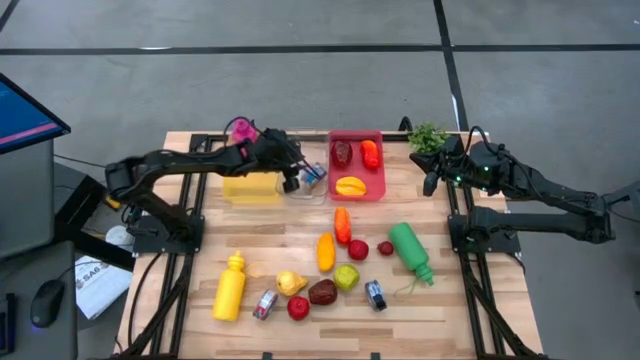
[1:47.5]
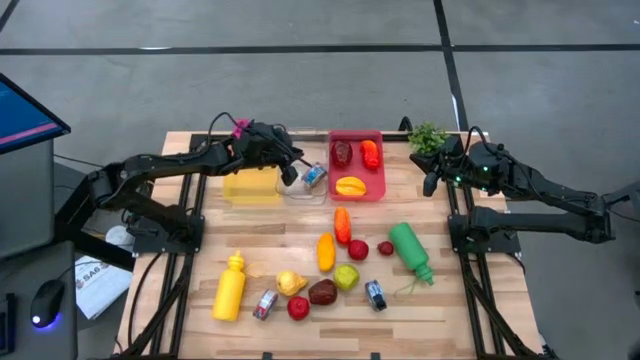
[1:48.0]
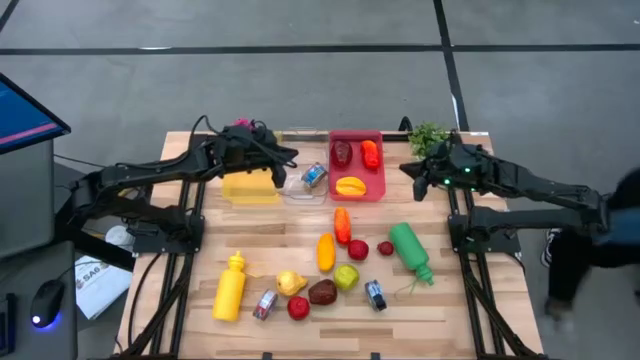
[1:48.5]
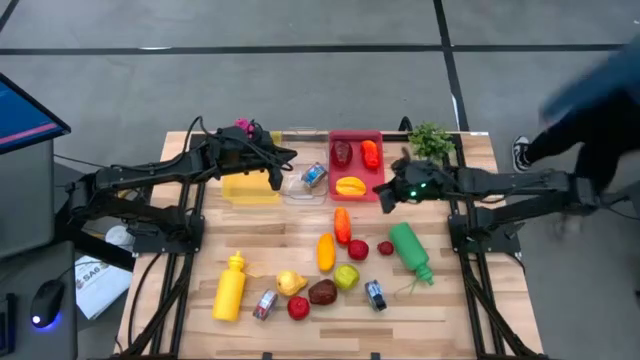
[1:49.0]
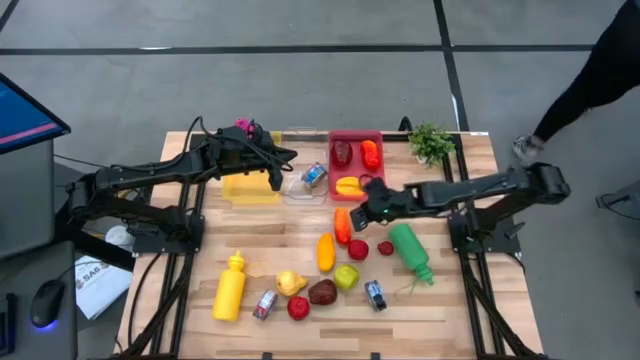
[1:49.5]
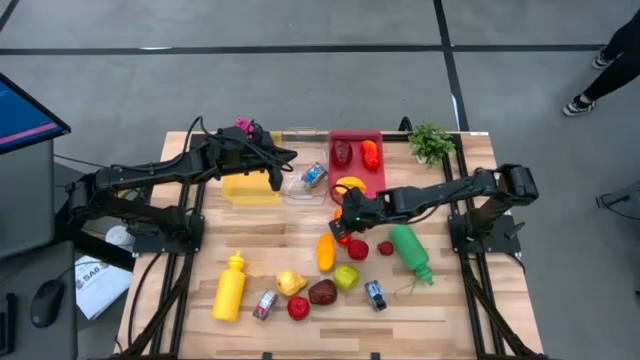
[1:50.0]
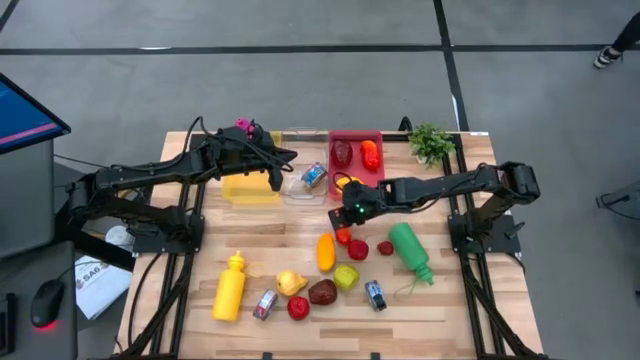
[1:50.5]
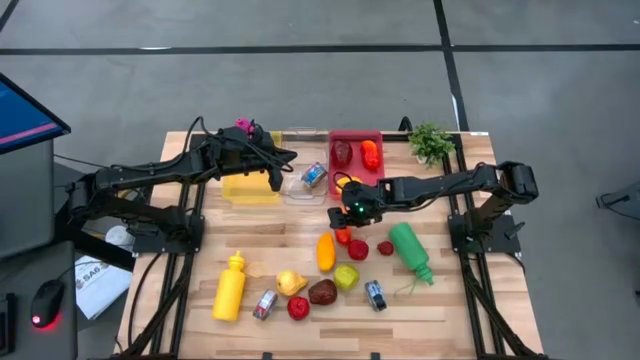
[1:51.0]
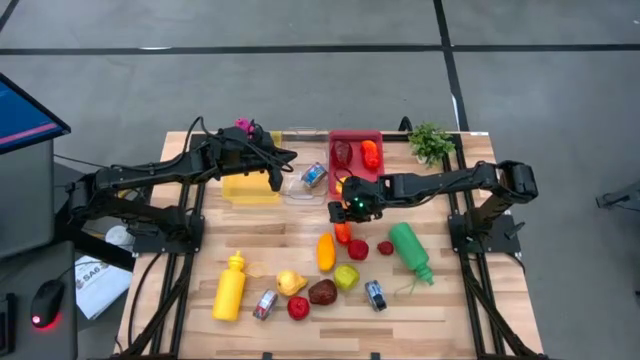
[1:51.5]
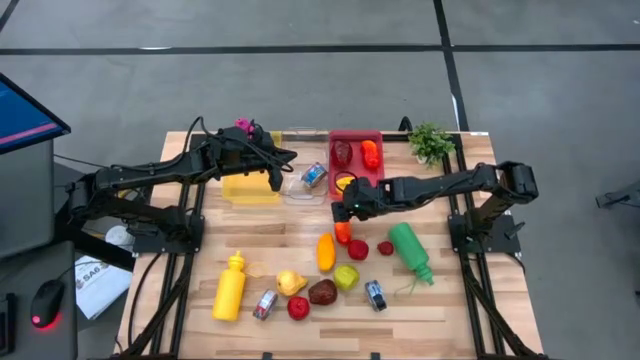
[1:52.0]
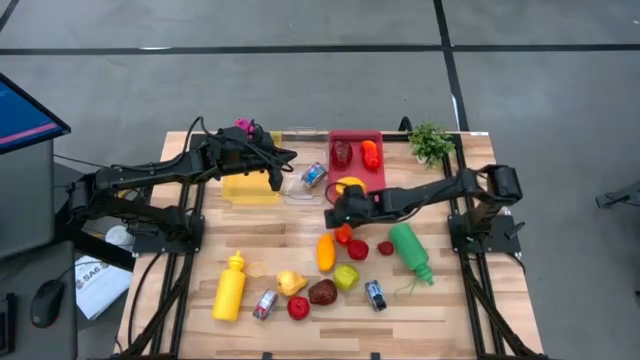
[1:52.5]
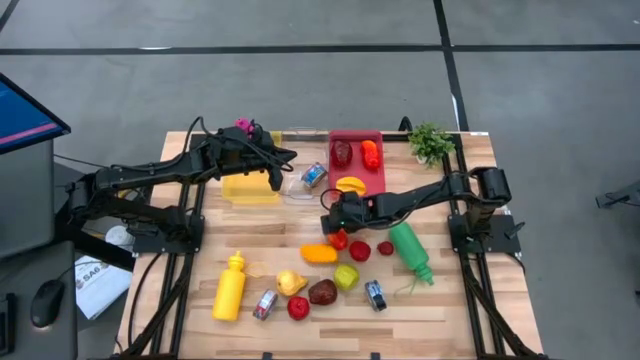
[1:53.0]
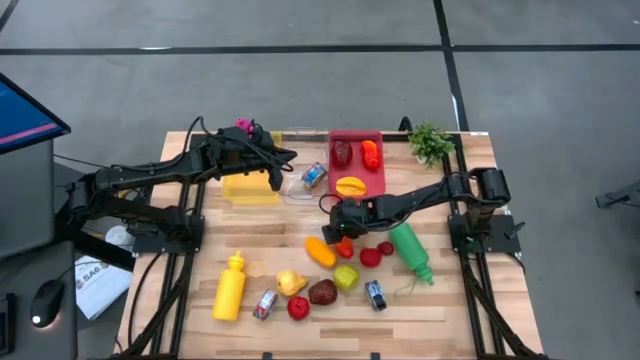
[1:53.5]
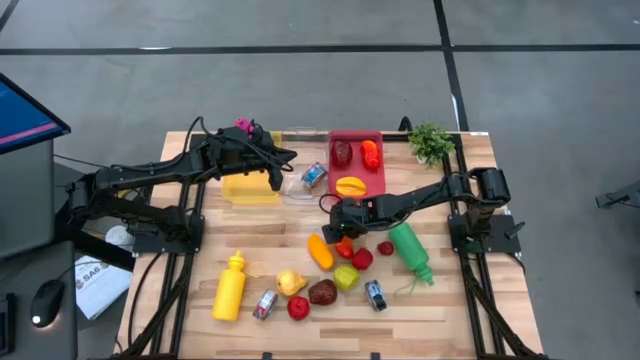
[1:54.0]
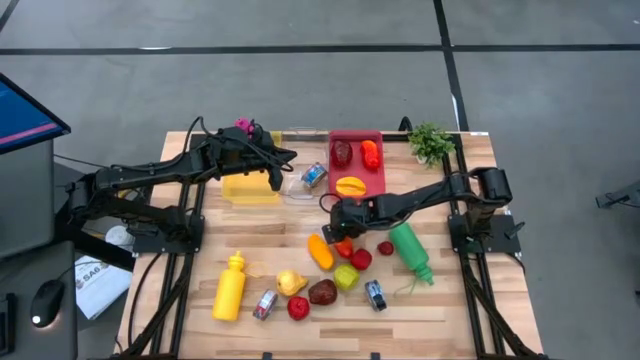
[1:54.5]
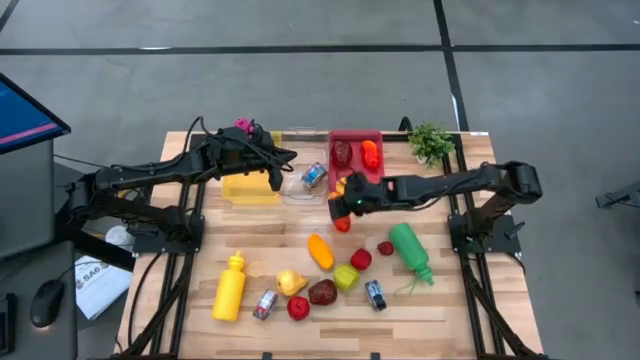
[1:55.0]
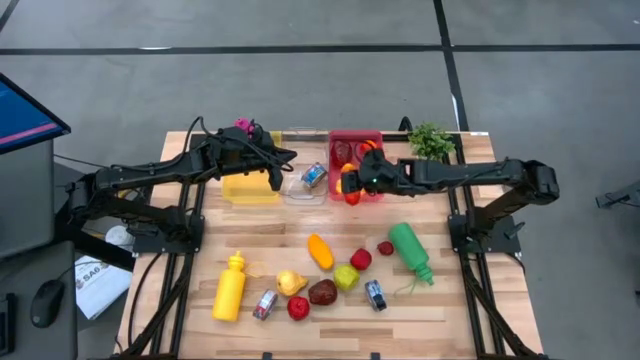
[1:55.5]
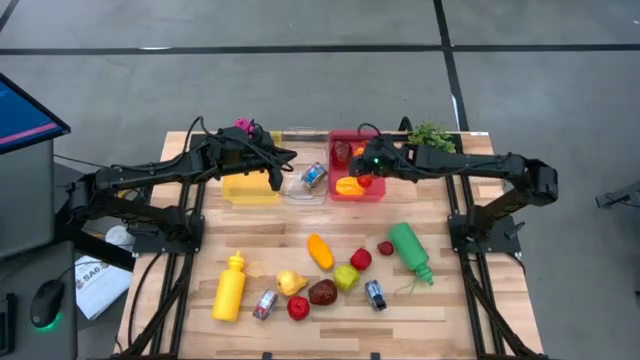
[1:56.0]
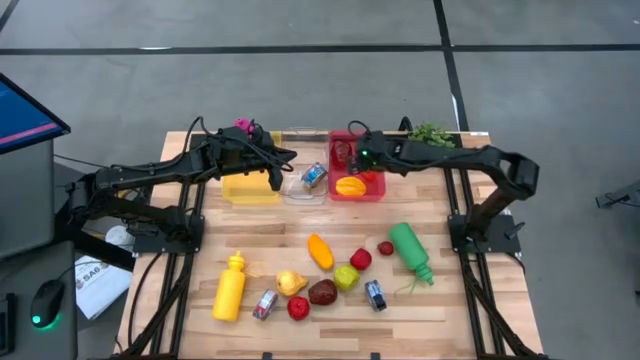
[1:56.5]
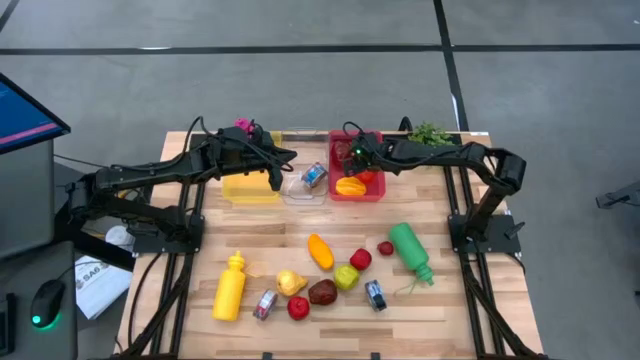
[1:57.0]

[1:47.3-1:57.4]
Task: Pick & Place Food Item
Put the orange mango into the pink bin

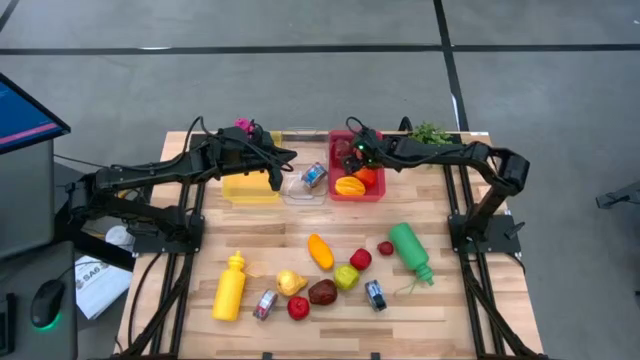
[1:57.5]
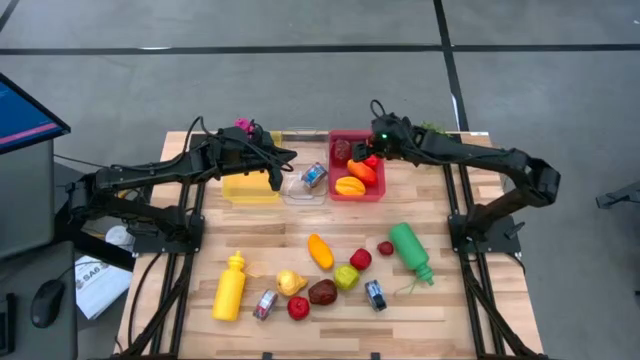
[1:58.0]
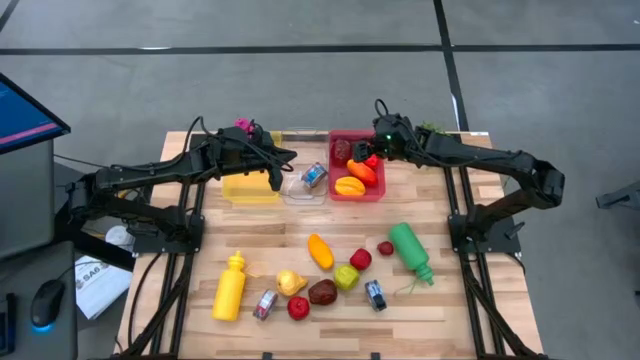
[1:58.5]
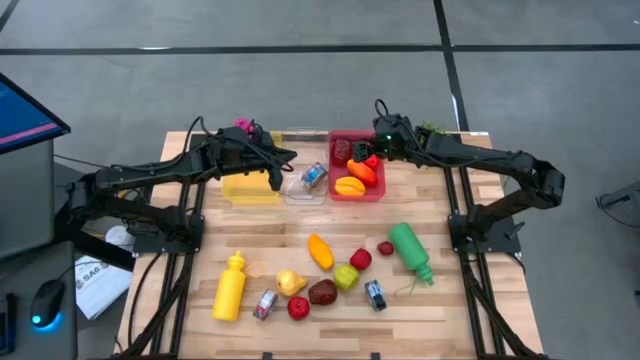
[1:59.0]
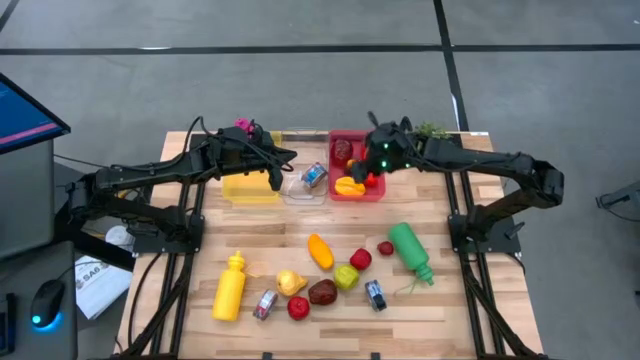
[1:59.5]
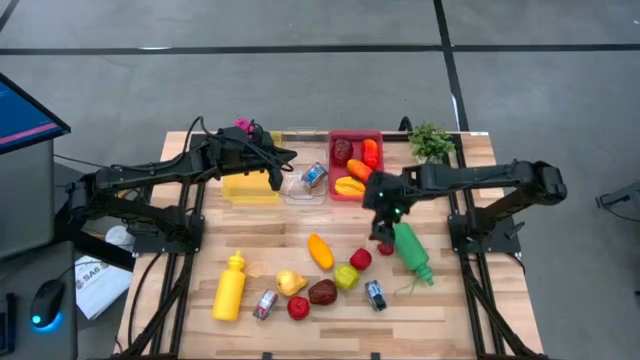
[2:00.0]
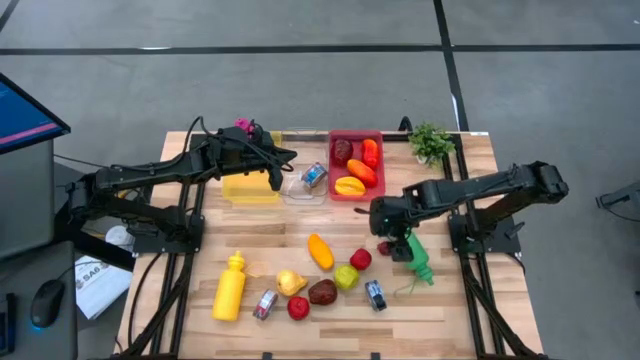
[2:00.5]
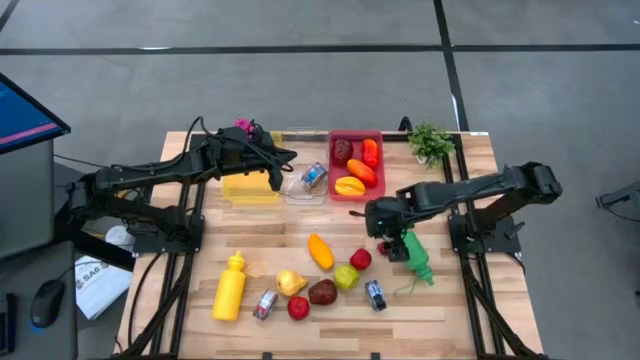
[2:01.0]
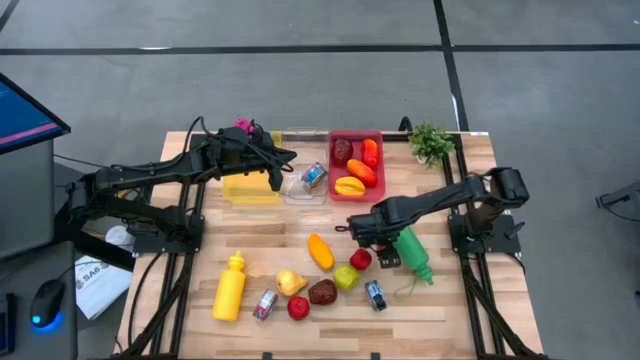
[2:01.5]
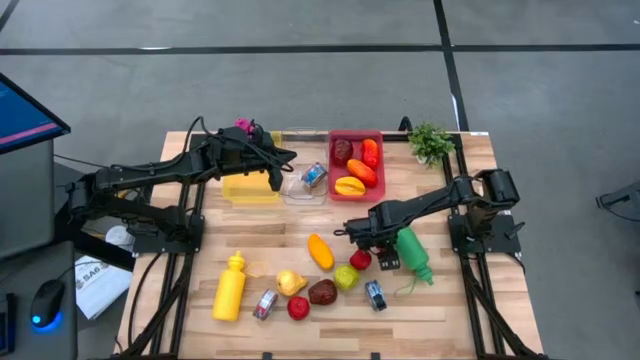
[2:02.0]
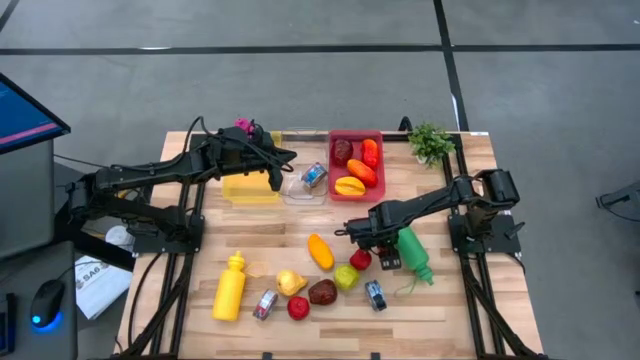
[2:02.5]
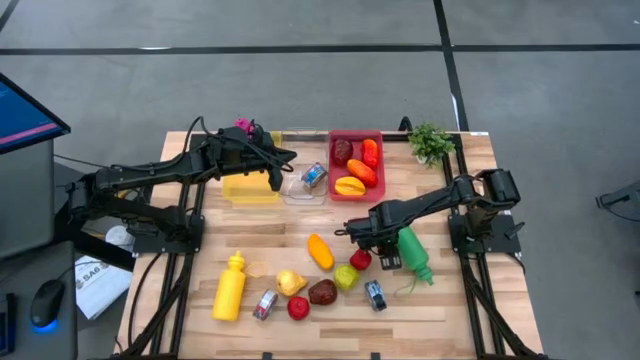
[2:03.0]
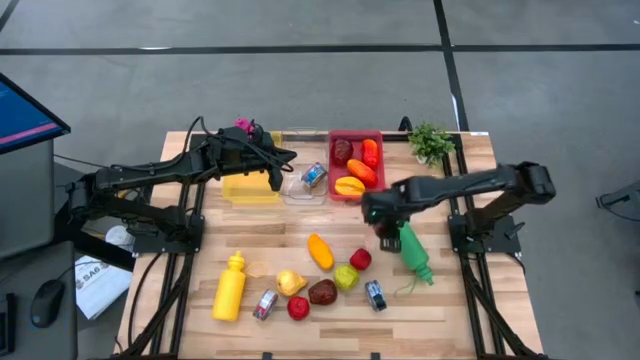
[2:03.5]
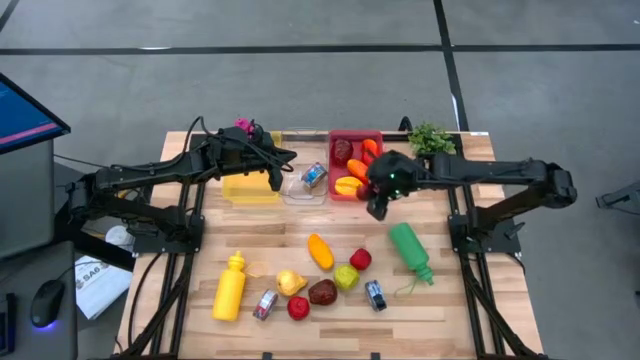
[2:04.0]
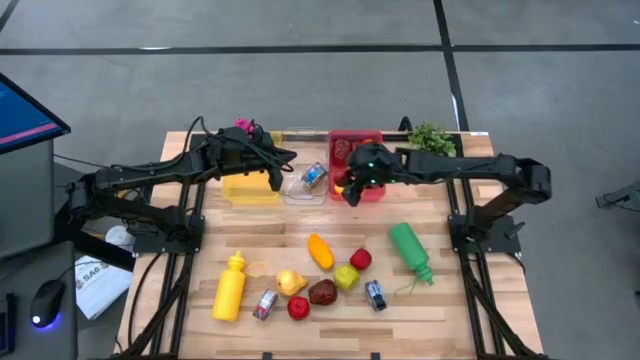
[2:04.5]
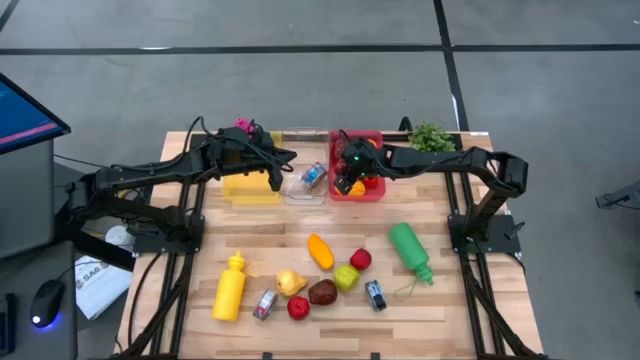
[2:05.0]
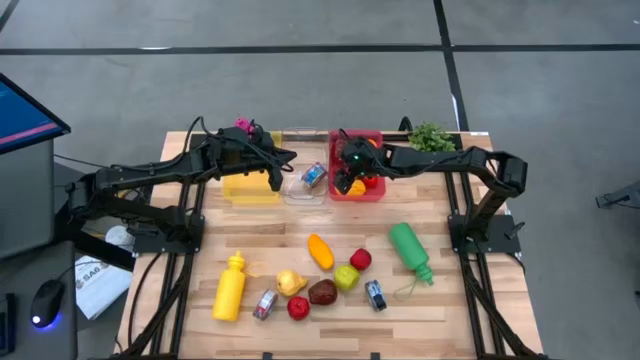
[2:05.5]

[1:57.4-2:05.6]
Put the pomegranate into the pink bin

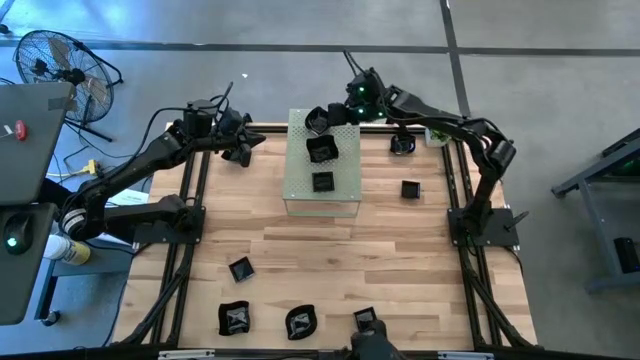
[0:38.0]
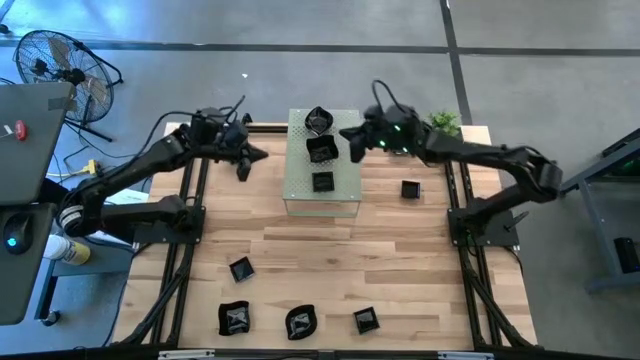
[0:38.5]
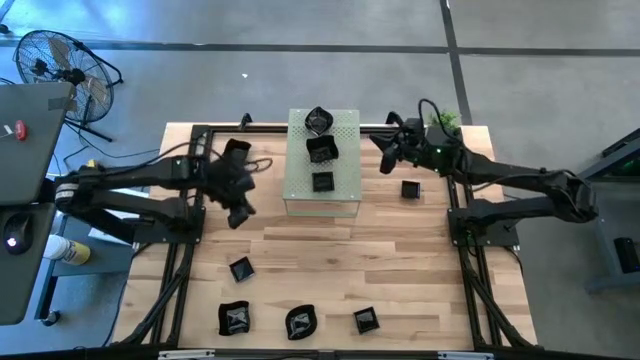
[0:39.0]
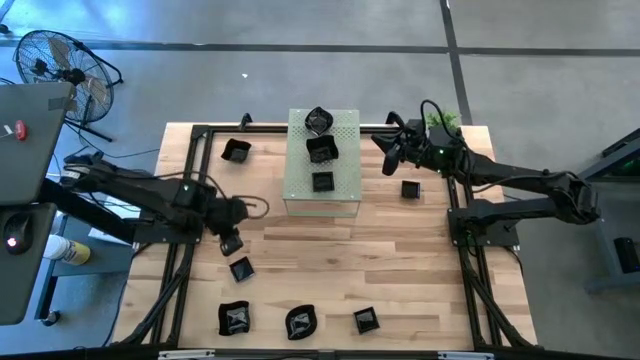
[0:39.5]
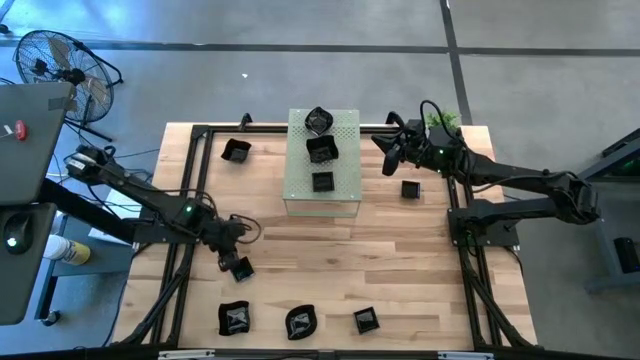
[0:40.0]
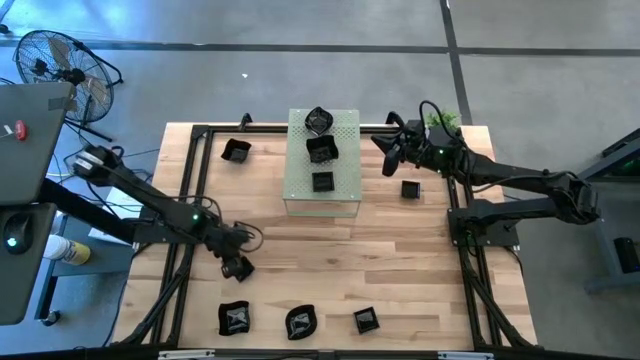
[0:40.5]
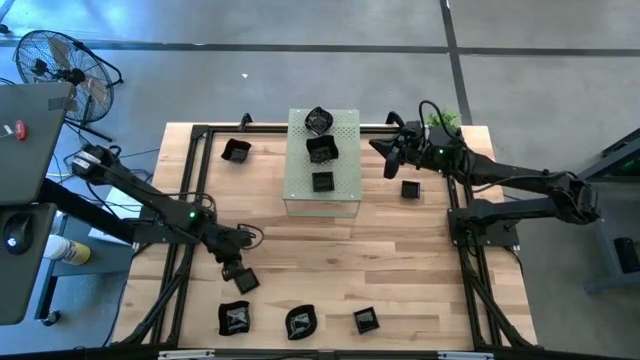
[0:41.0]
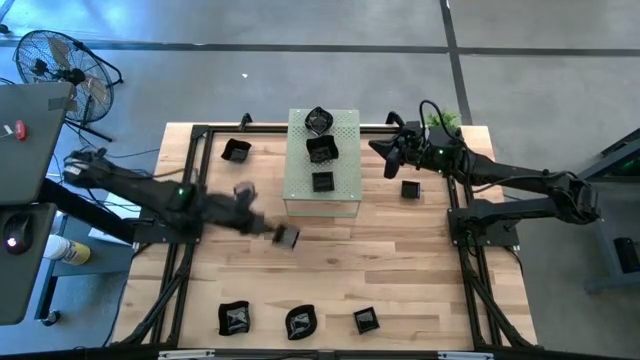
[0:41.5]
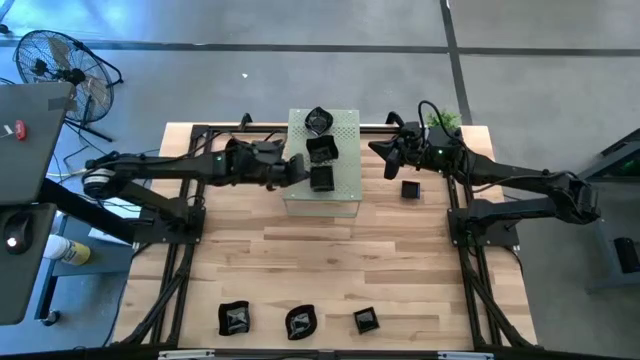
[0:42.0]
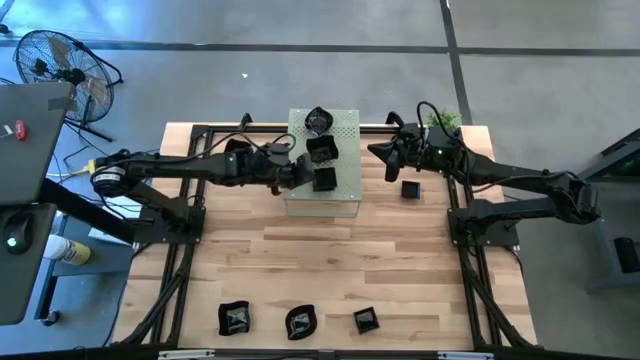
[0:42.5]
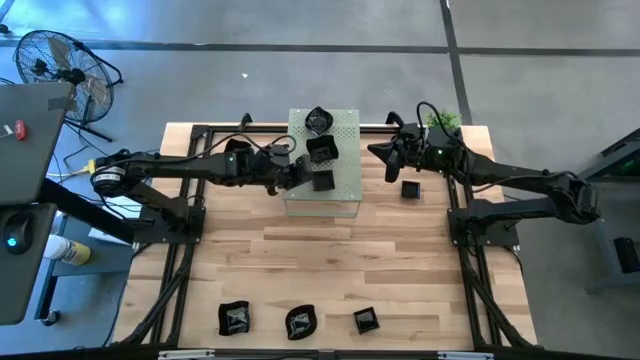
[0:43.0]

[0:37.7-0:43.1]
Task: Pick & Place Mini shaped plates
Stack the top black square plate on top of the black square plate on the shelf
